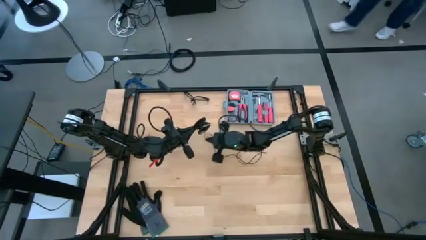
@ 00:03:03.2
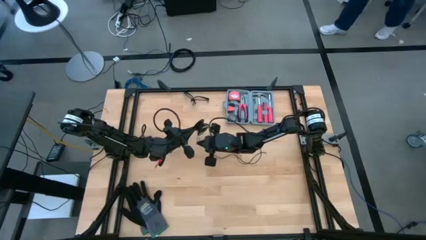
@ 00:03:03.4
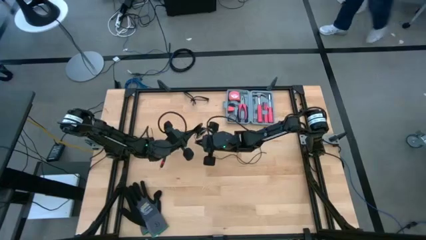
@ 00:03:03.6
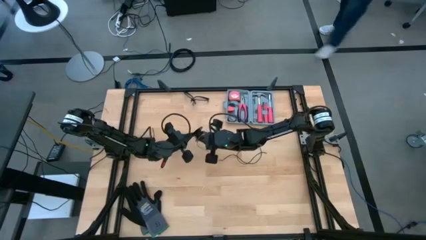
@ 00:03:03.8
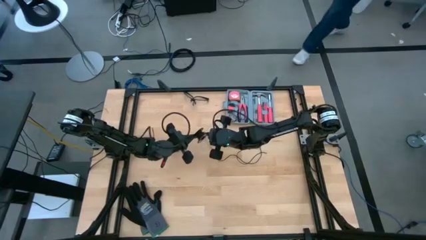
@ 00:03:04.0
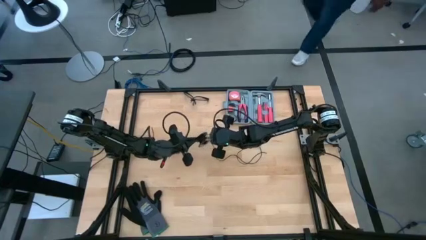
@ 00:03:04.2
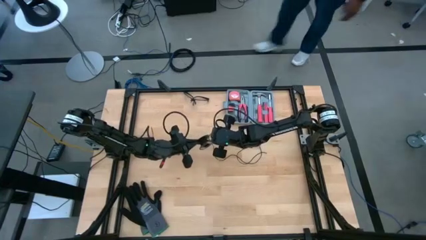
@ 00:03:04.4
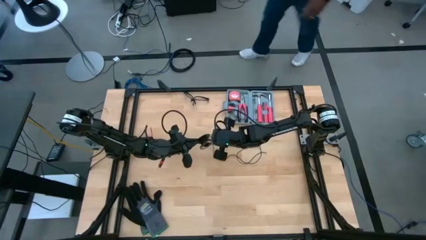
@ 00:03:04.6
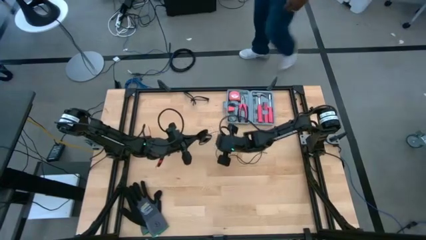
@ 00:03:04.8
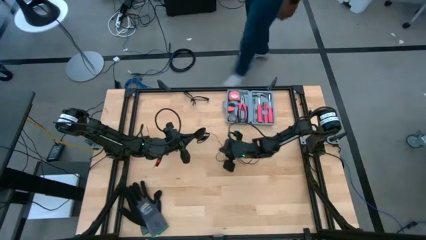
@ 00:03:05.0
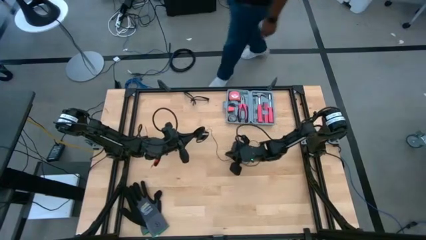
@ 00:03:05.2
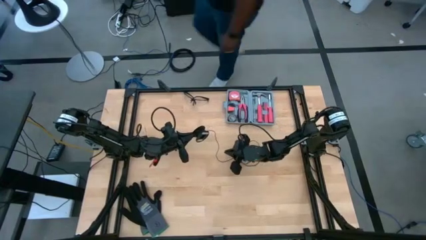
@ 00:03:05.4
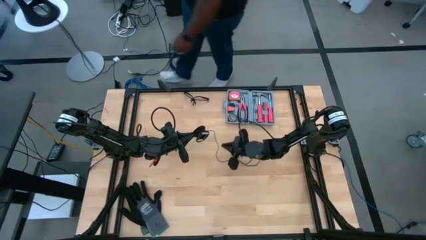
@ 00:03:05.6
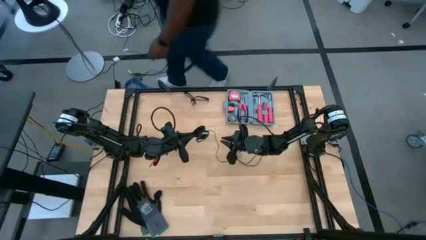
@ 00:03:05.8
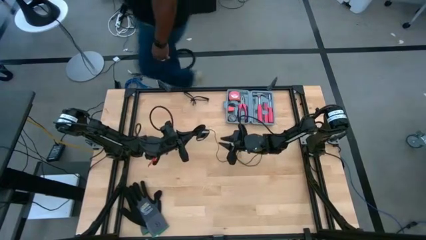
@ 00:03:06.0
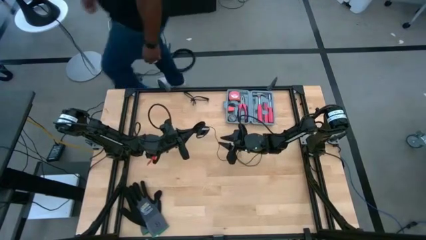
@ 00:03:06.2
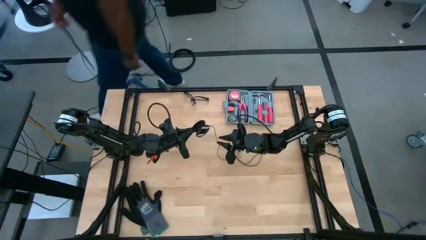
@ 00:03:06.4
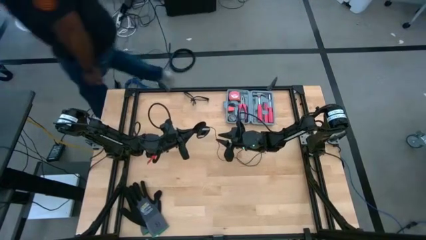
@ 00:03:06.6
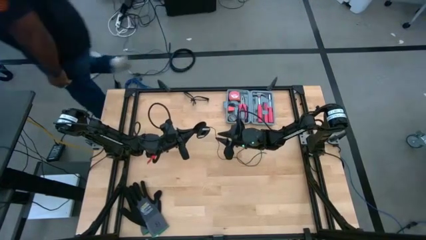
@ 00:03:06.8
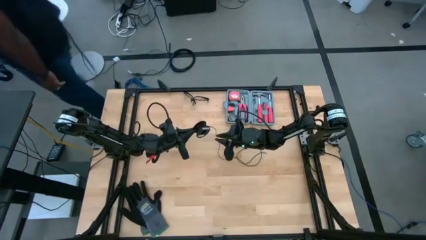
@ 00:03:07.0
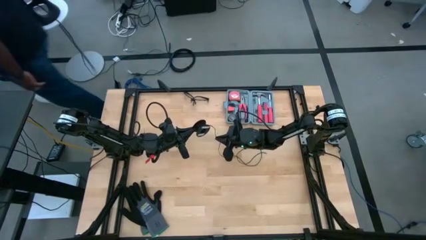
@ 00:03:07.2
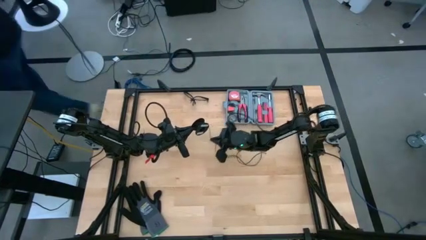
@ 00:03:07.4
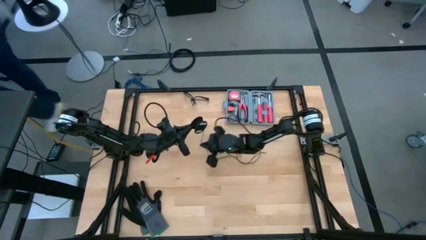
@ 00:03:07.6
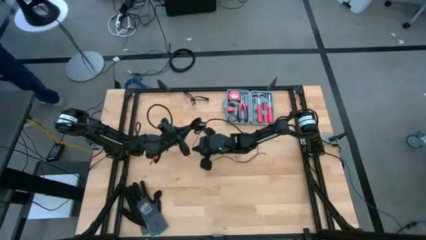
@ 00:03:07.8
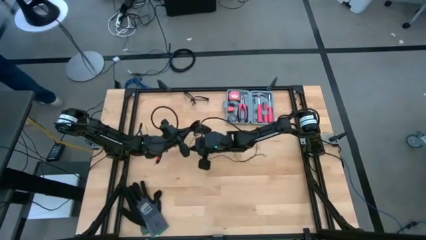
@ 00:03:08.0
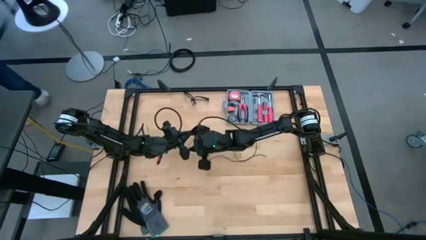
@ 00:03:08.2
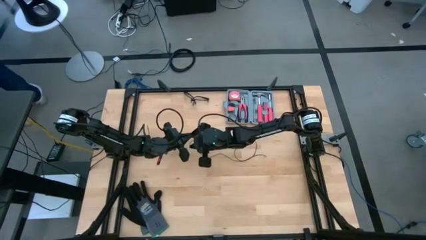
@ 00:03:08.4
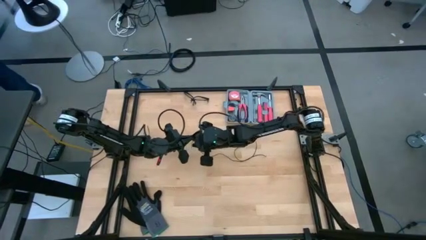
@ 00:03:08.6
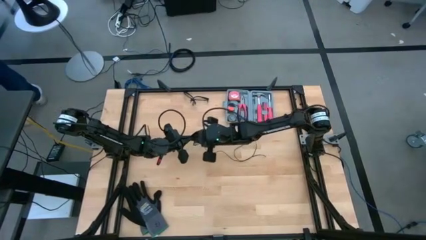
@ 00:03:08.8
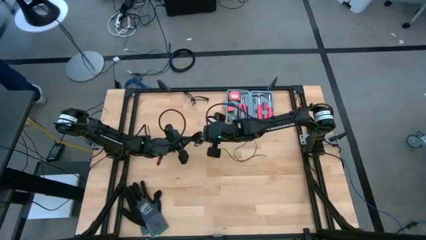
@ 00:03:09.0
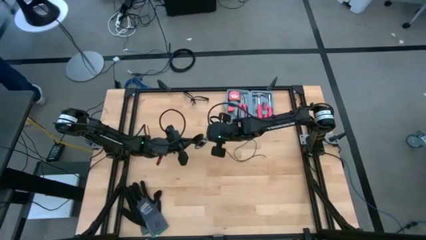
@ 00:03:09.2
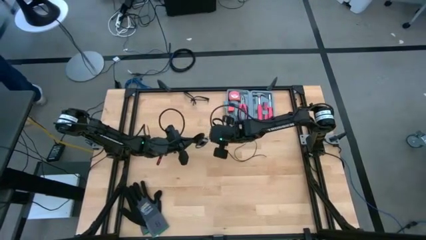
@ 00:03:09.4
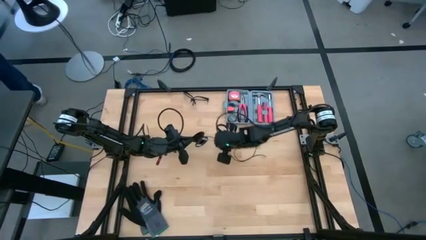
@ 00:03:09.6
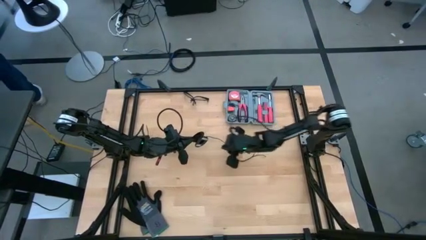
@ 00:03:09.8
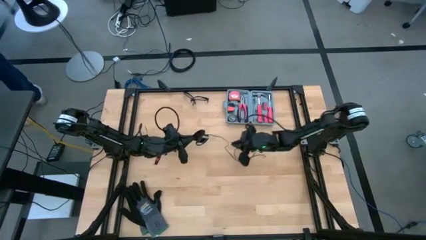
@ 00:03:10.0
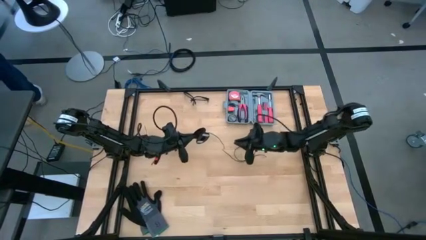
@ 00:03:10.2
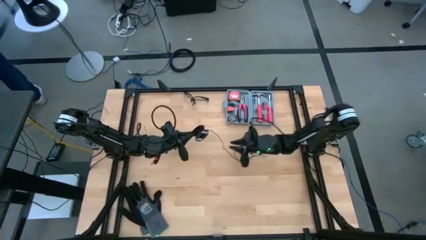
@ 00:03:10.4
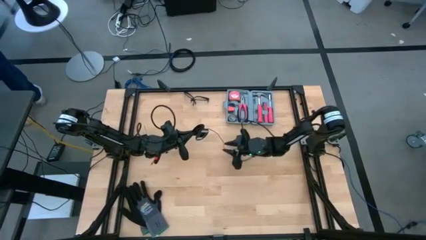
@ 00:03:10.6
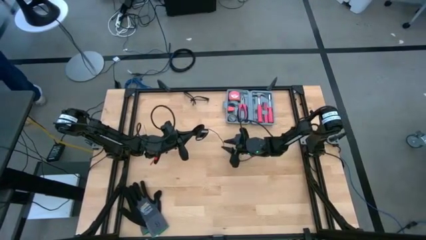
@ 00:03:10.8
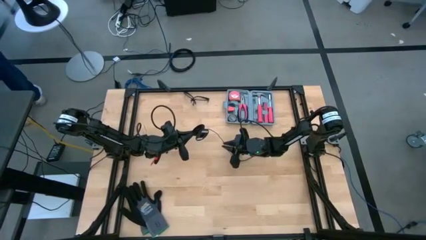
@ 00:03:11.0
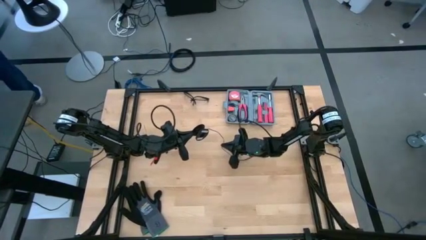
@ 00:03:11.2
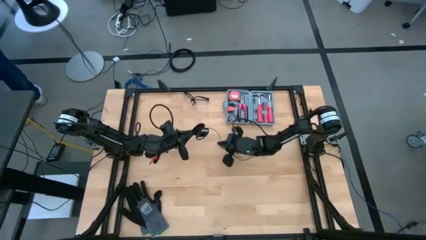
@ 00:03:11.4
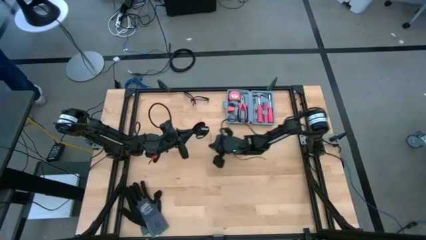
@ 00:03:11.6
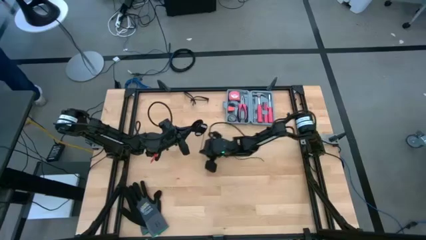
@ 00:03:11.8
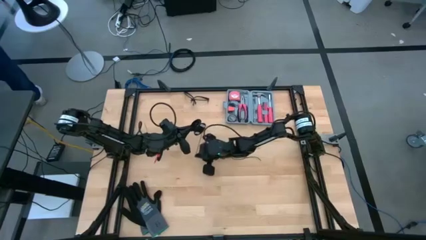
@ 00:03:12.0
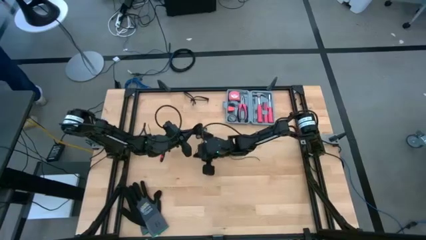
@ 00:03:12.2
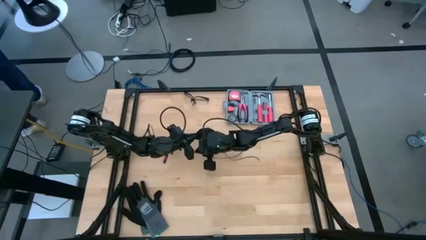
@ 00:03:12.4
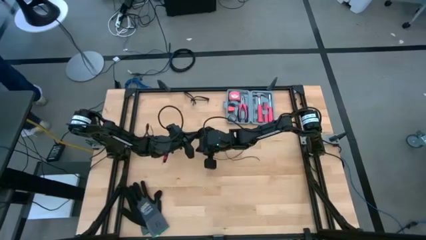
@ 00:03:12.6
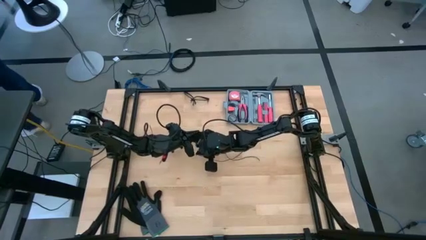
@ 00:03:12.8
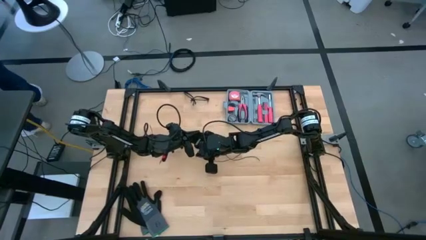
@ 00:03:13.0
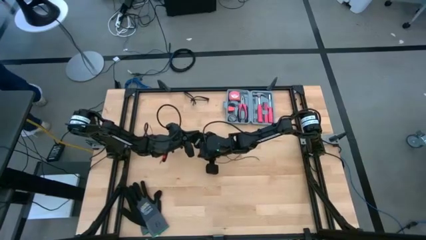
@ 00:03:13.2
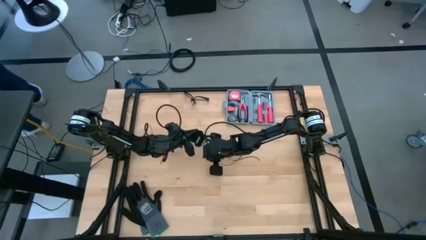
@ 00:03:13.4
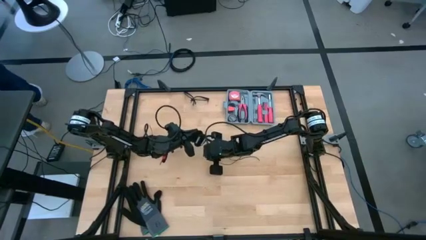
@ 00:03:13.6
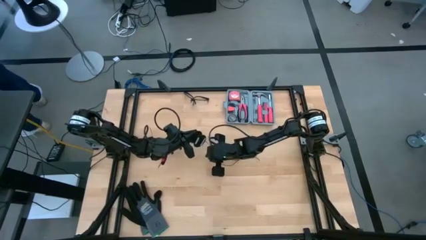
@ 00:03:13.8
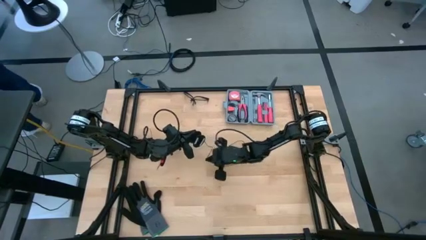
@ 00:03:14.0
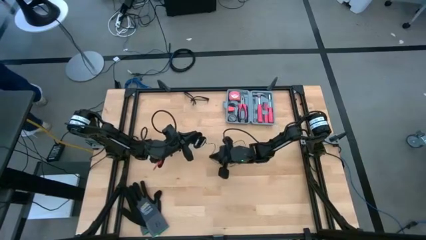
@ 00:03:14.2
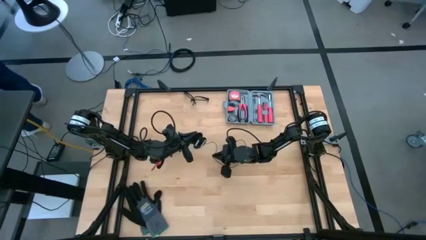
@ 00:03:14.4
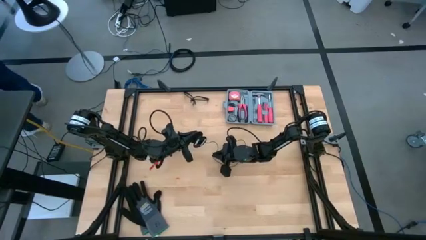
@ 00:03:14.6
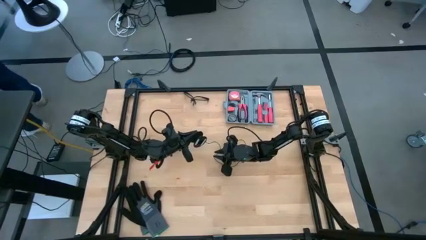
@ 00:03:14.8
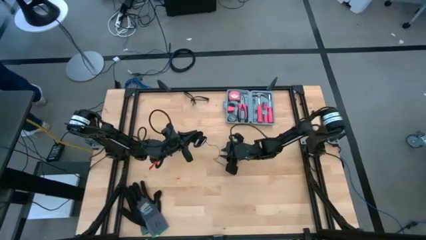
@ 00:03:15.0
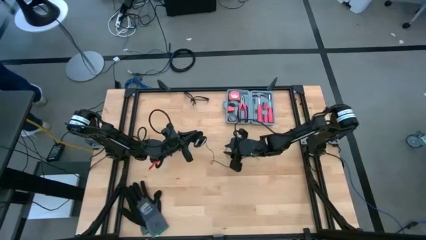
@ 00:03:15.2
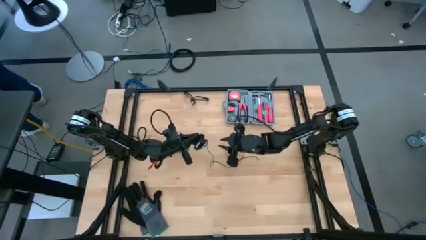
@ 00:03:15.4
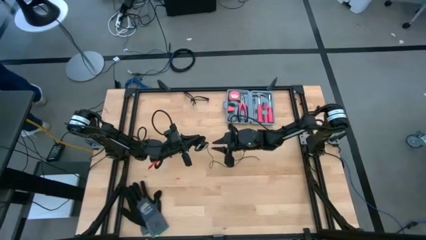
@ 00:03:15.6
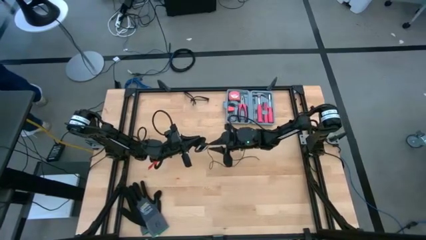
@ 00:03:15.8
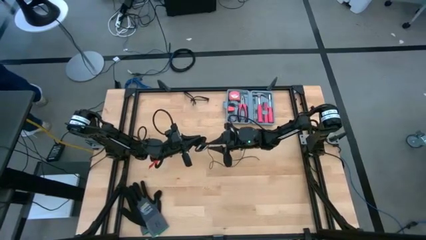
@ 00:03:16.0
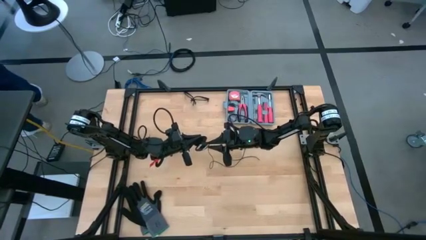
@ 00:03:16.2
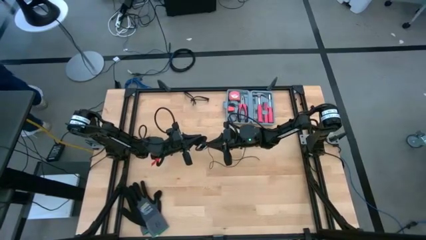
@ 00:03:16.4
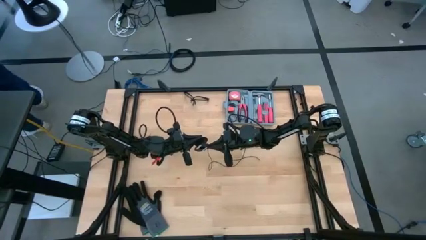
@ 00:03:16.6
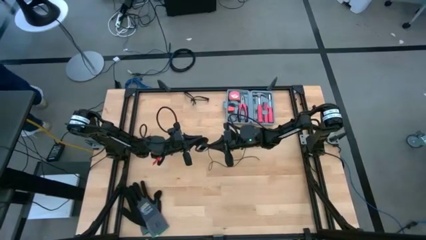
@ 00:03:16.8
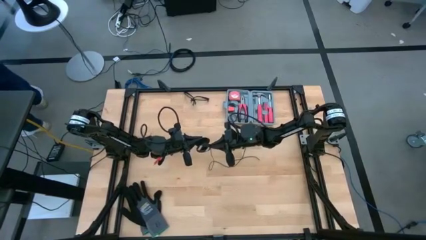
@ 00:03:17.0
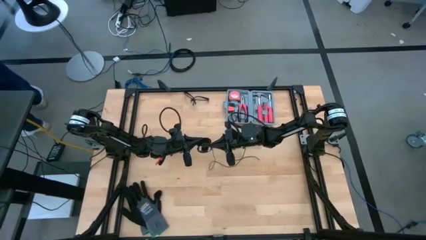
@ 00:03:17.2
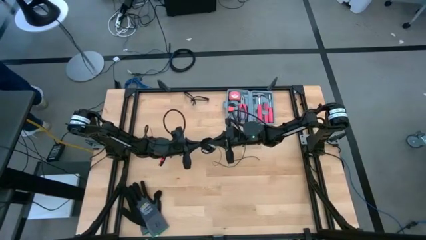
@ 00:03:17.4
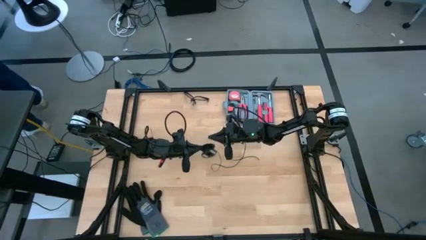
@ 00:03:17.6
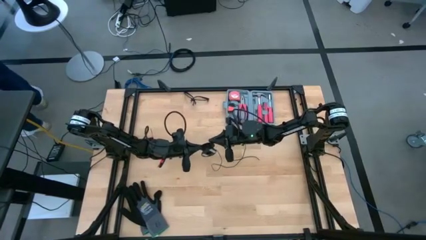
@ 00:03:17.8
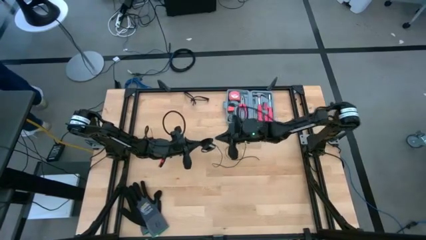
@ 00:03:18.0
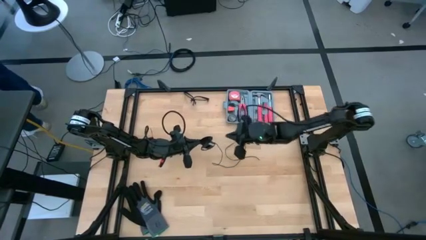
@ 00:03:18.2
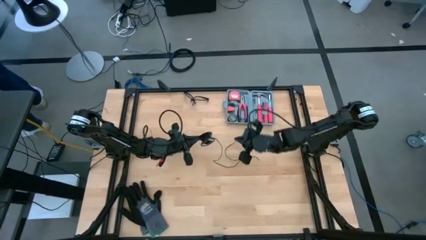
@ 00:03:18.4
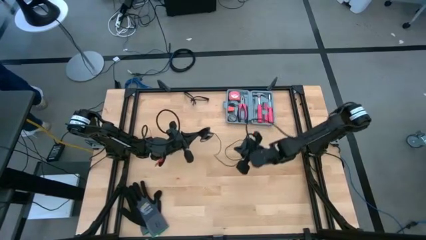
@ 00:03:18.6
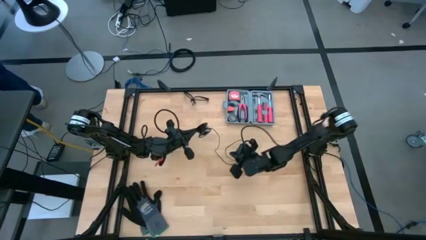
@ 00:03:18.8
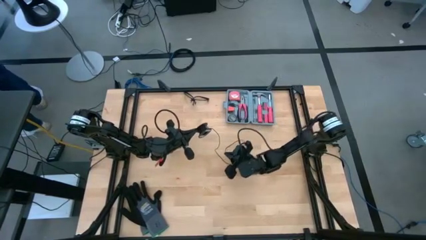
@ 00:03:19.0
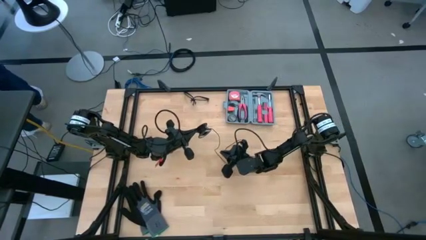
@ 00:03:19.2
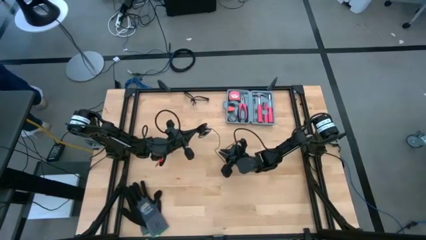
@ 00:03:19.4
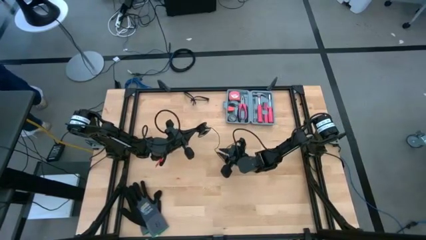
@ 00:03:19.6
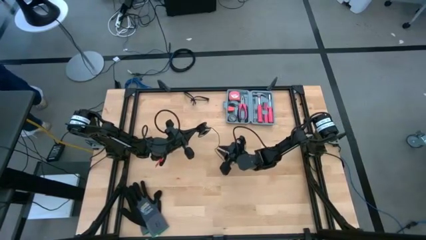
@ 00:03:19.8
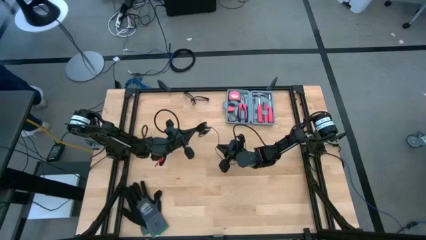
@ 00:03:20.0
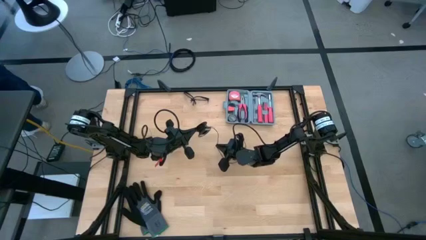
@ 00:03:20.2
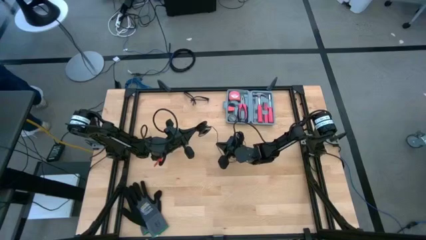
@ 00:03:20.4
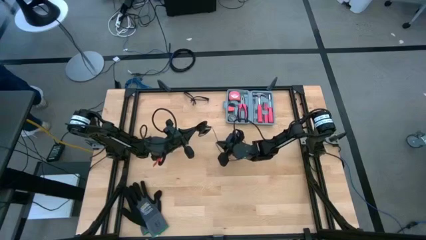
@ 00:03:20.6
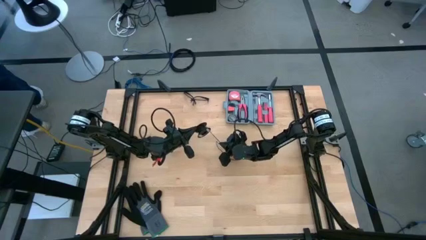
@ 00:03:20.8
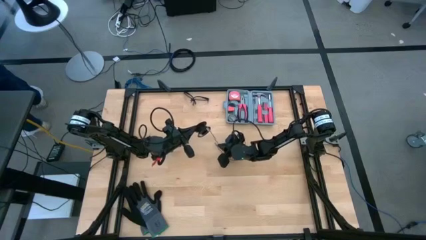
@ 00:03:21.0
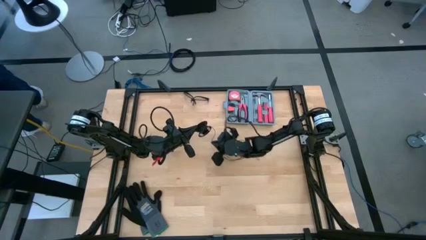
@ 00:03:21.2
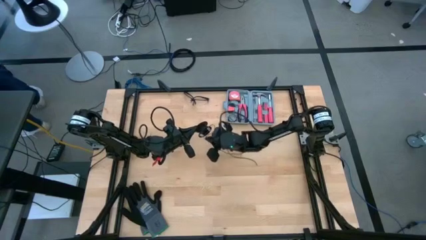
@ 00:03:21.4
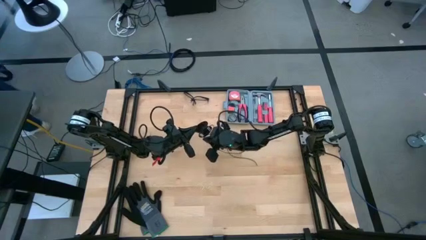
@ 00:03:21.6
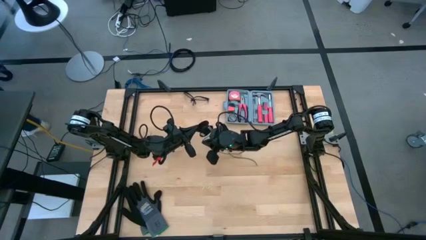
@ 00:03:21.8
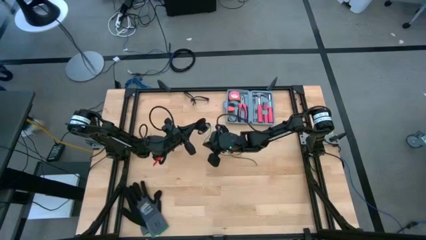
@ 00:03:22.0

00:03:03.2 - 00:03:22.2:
Task: Coil cords
Coil the black wire onto the spool
